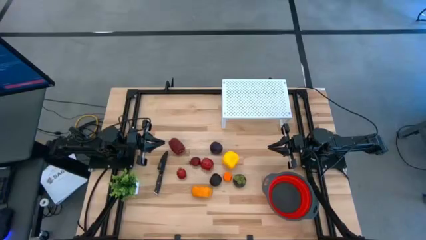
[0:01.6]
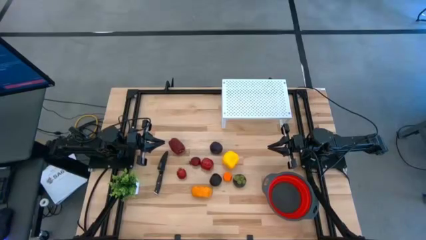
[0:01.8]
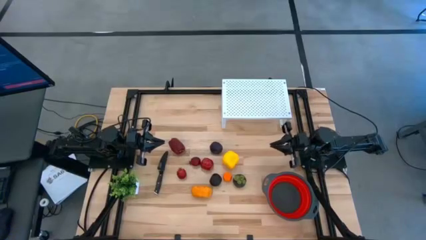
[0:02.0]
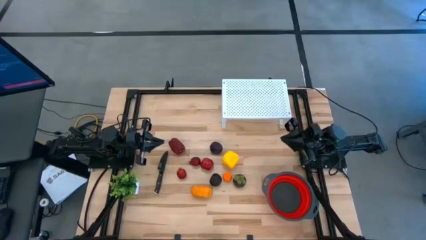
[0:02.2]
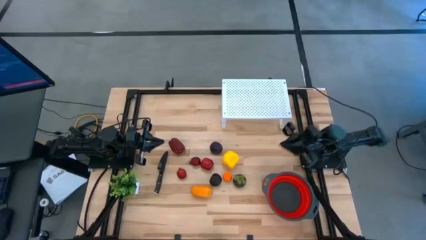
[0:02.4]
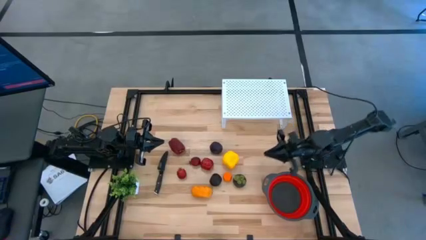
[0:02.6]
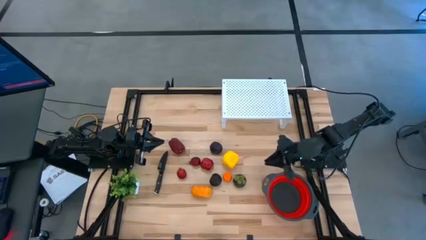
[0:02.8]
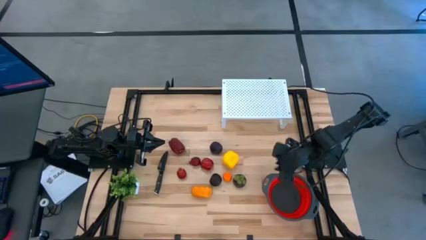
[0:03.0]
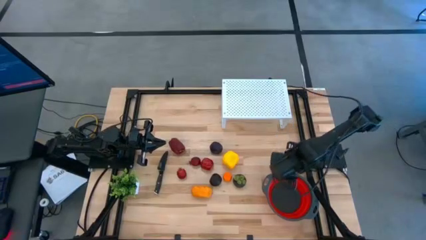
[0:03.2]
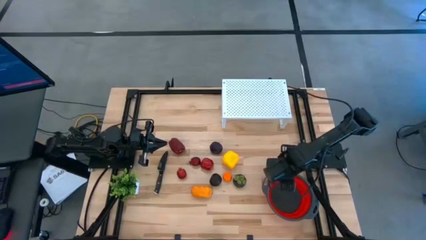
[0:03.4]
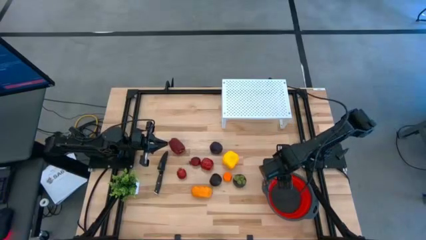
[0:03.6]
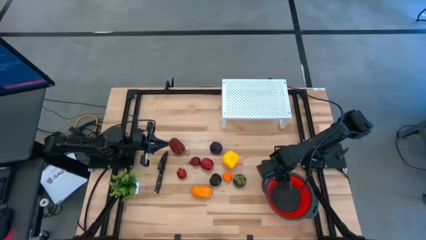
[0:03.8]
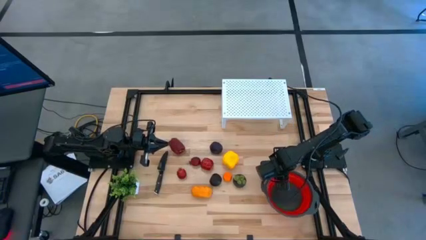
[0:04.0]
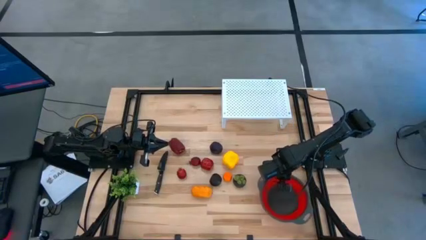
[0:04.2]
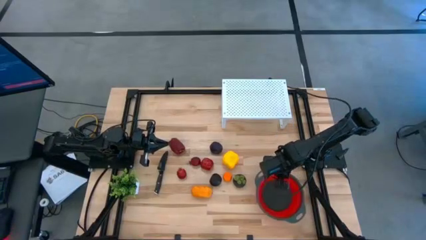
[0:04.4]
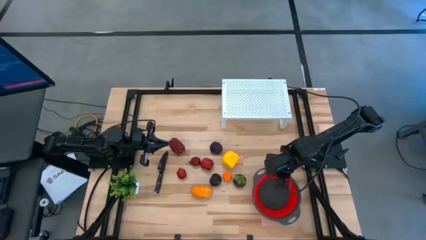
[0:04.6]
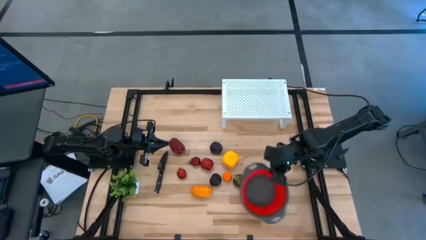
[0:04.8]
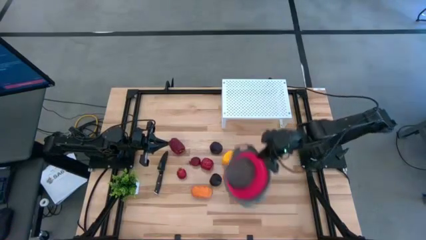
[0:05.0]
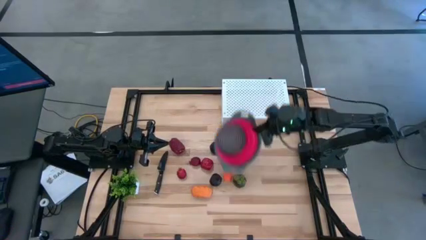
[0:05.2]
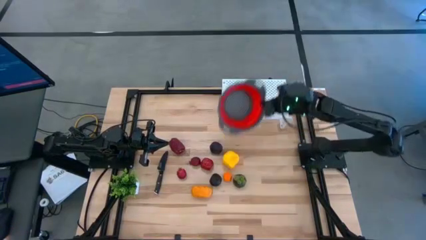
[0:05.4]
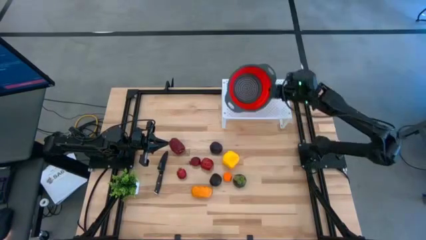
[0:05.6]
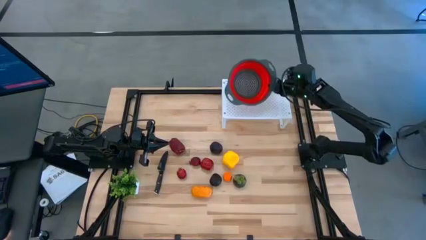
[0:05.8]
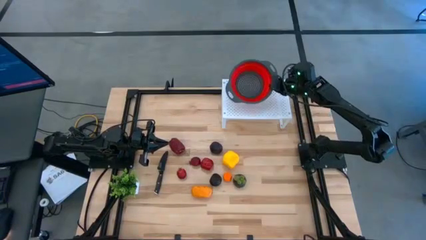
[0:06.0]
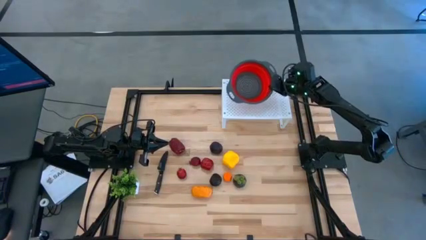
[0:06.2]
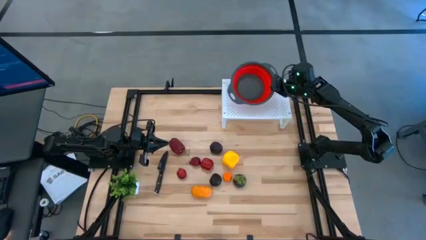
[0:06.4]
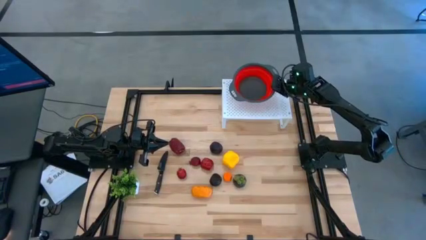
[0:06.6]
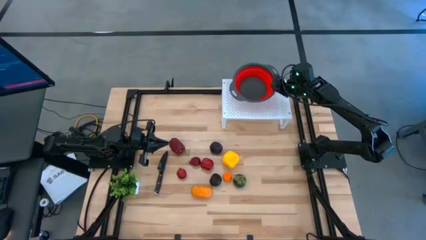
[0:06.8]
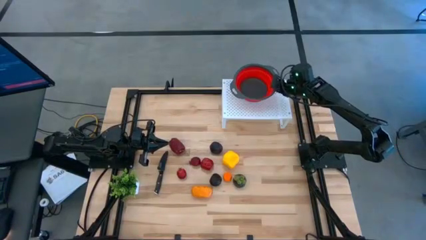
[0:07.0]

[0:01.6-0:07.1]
Task: Pick & Place Fruit
Put the orange strainer bowl on the shelf

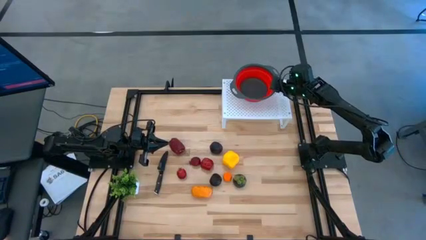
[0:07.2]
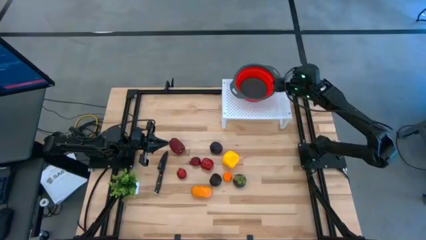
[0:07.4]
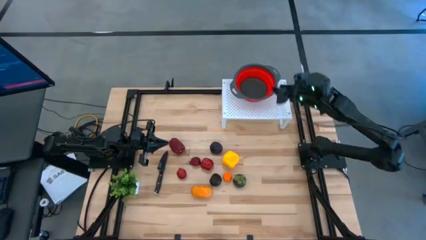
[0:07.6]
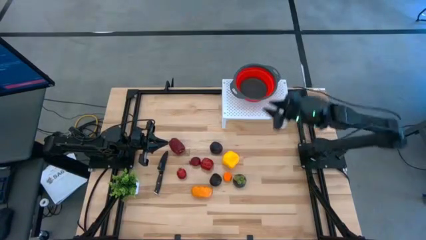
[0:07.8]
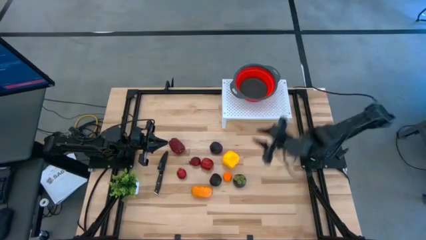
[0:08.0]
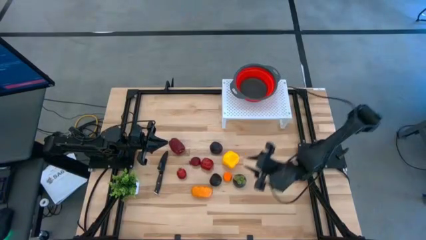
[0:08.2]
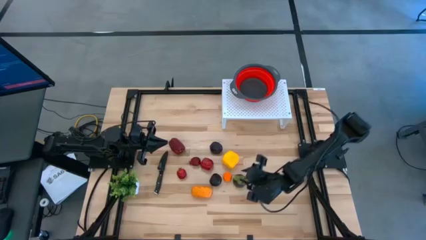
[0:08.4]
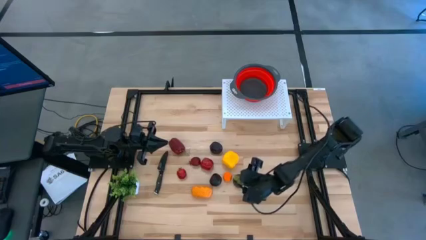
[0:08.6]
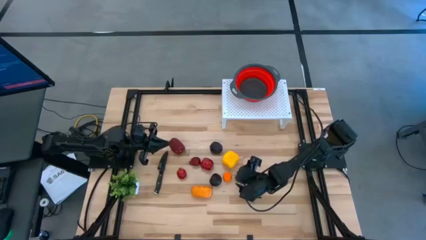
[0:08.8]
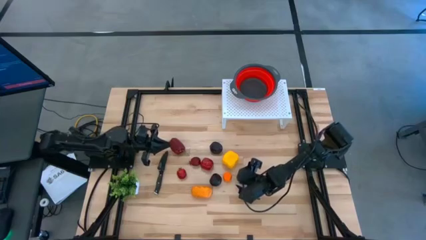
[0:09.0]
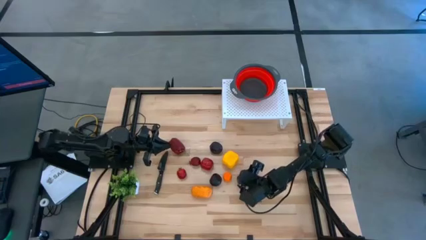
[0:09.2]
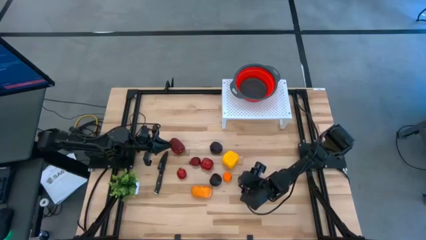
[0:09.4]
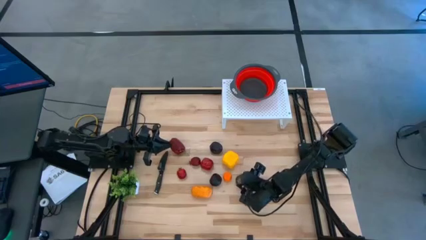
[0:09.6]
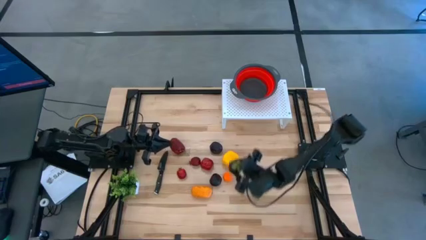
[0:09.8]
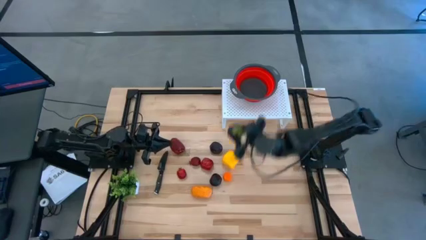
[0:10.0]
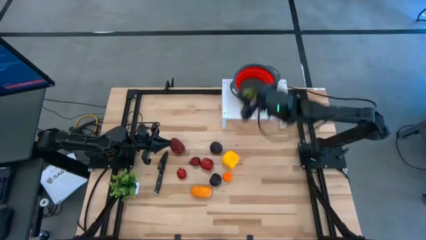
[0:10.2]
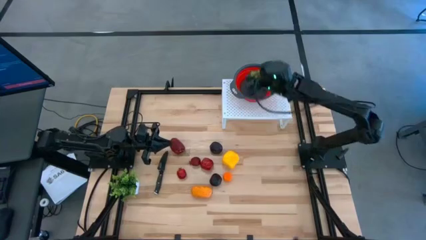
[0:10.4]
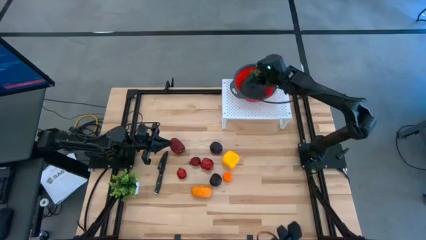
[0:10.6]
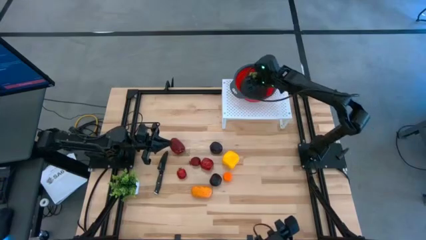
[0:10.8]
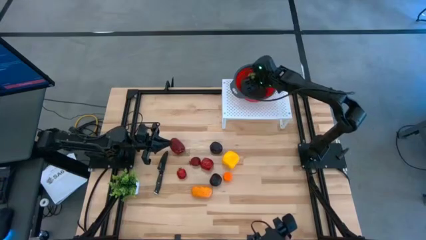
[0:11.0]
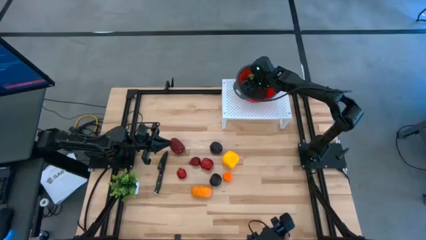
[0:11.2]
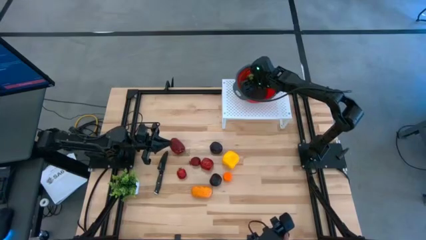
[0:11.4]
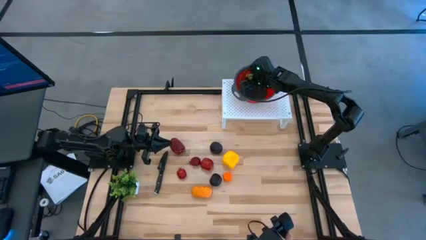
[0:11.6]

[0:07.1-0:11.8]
Put the purple mangosteen into the orange strainer bowl on the shelf

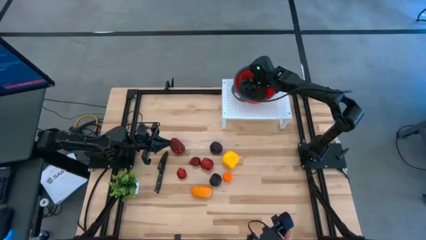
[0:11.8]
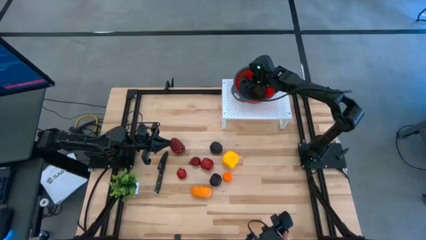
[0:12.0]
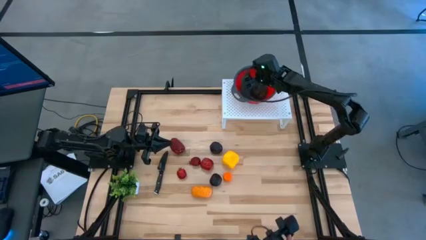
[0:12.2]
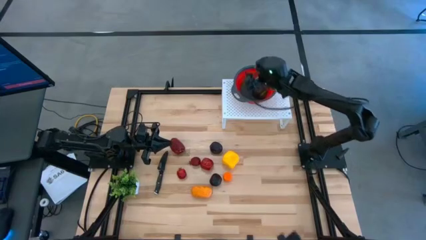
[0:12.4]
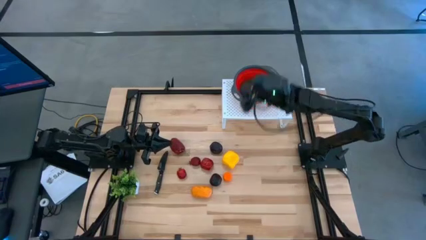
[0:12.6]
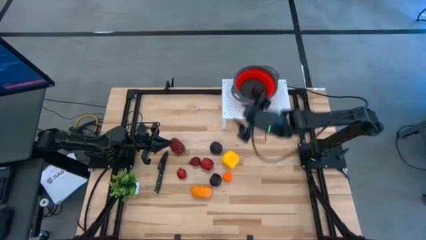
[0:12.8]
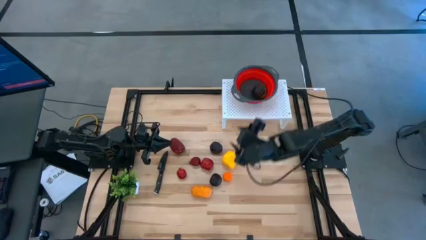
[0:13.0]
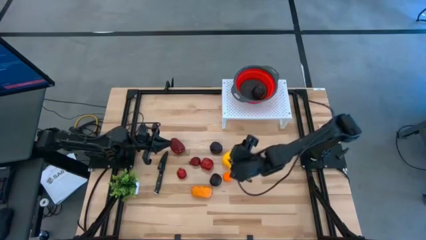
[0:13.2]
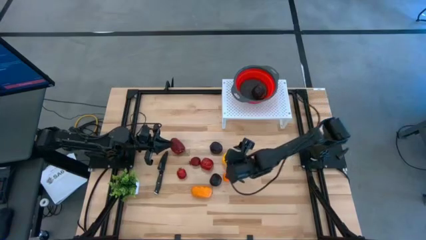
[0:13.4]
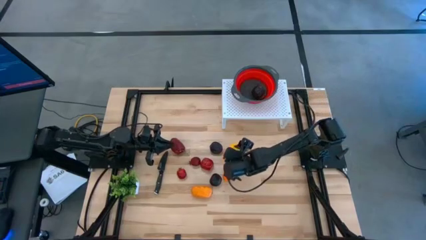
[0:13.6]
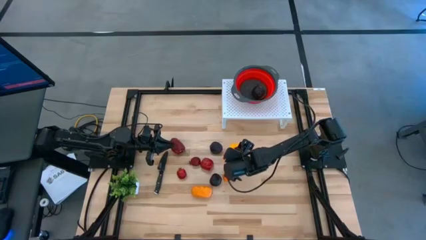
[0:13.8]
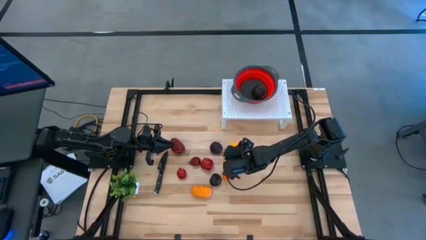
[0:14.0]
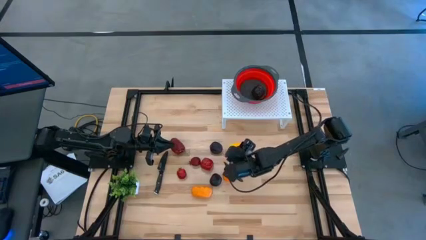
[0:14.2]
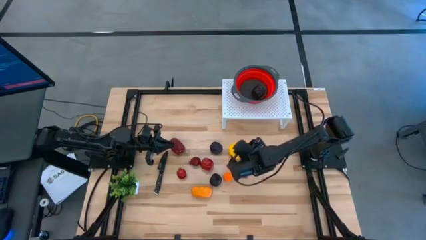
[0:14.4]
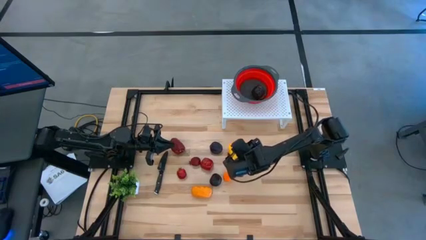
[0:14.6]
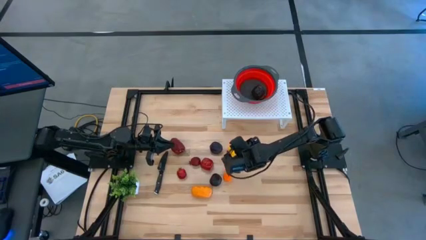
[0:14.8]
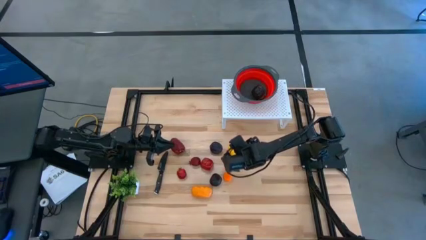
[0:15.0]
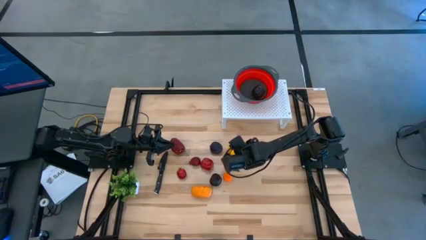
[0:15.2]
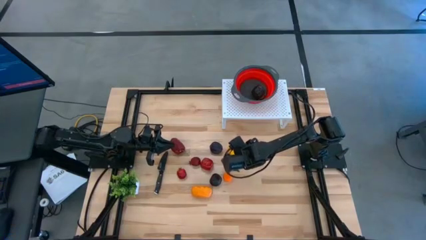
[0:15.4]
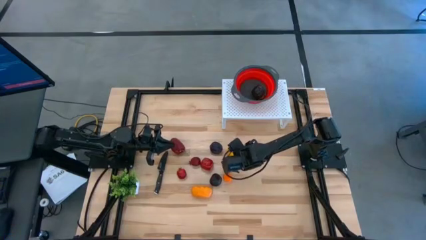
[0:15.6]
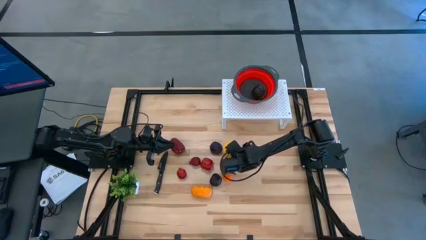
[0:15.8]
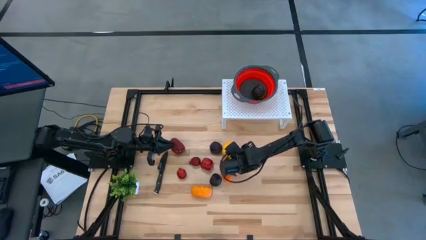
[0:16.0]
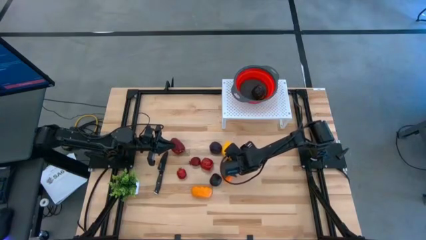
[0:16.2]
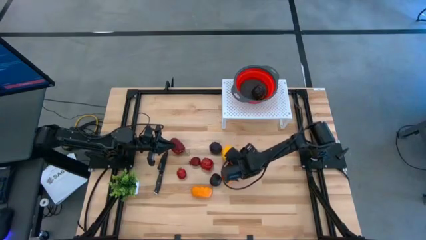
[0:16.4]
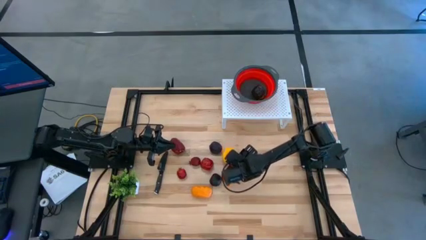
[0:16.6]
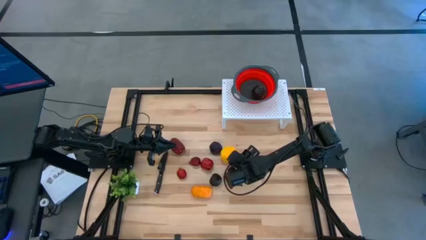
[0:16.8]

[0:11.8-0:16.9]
Put the yellow bell pepper into the orange strainer bowl on the shelf
